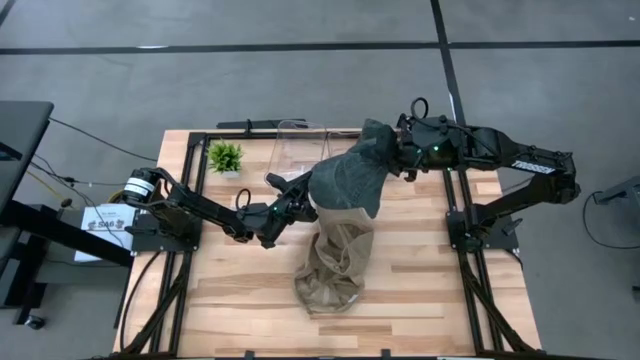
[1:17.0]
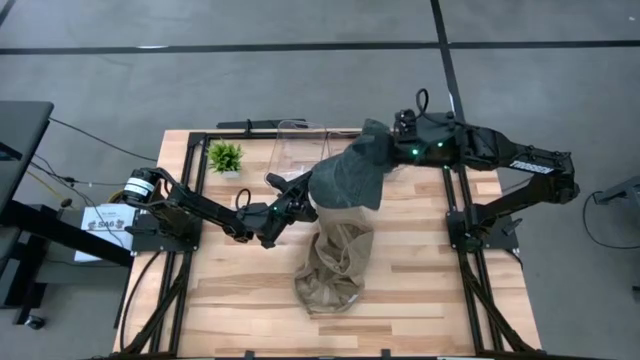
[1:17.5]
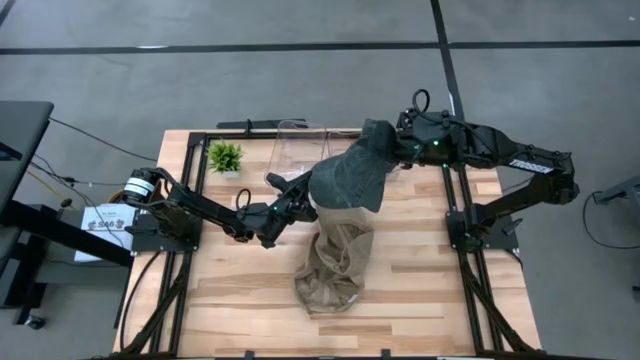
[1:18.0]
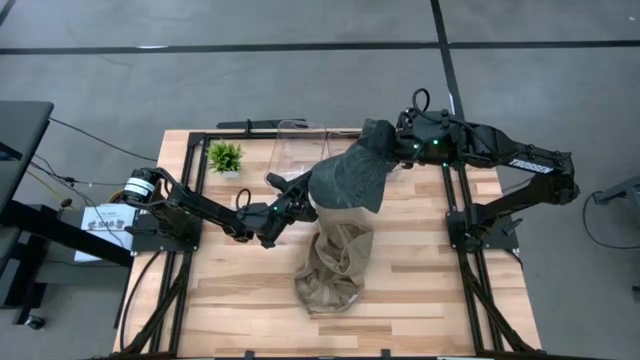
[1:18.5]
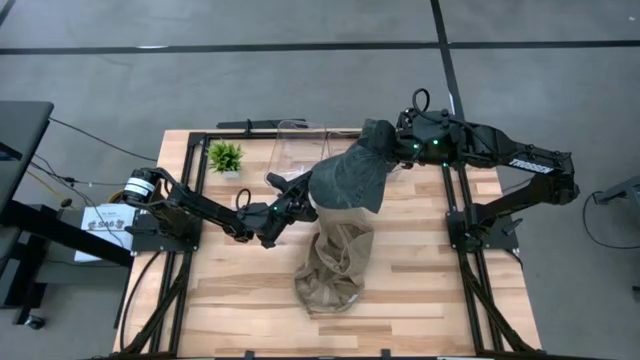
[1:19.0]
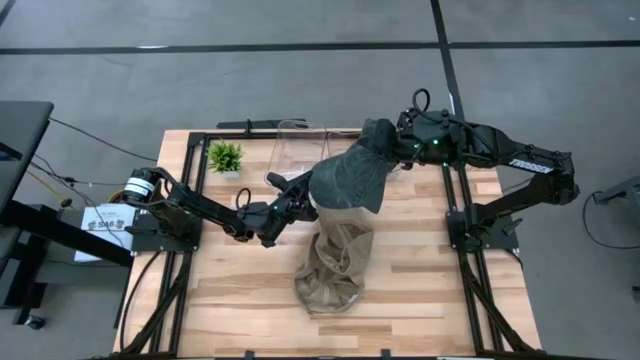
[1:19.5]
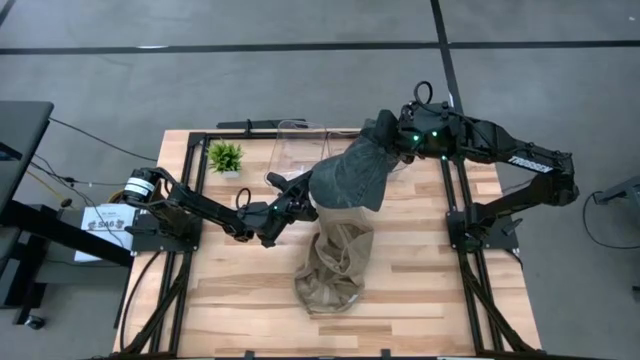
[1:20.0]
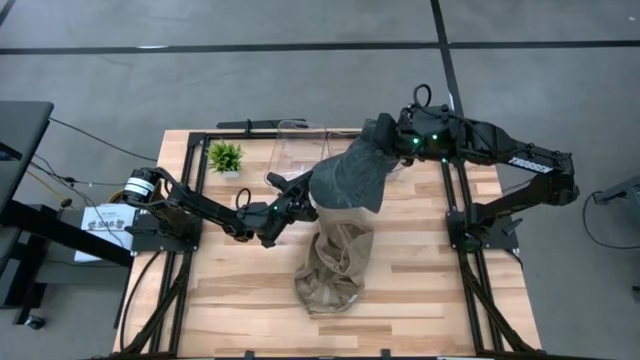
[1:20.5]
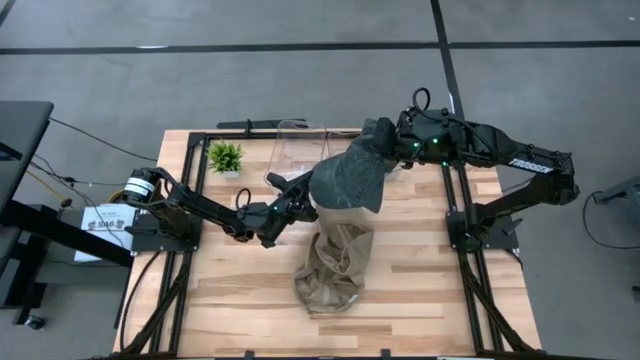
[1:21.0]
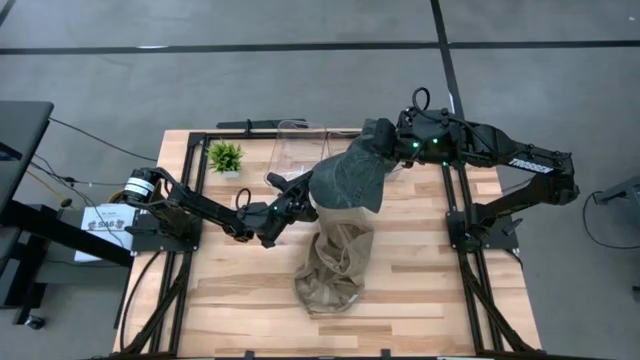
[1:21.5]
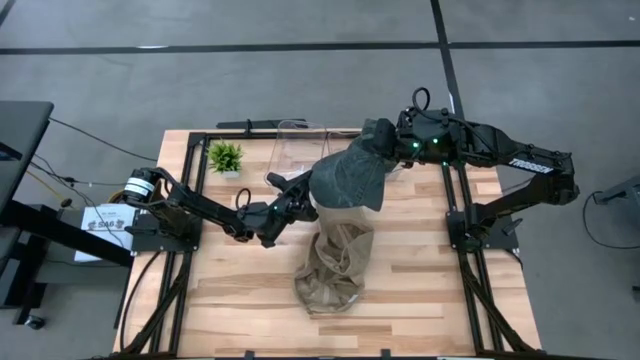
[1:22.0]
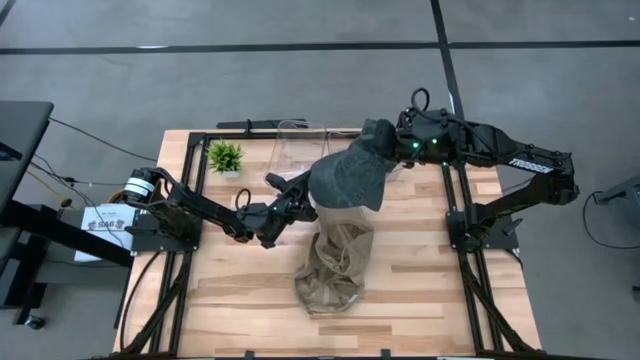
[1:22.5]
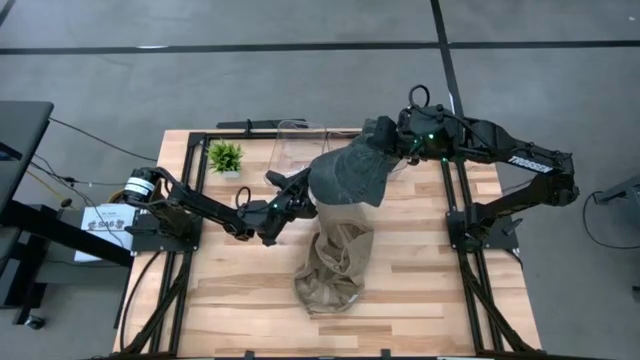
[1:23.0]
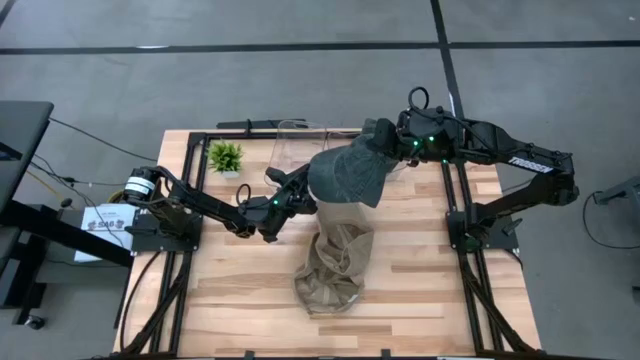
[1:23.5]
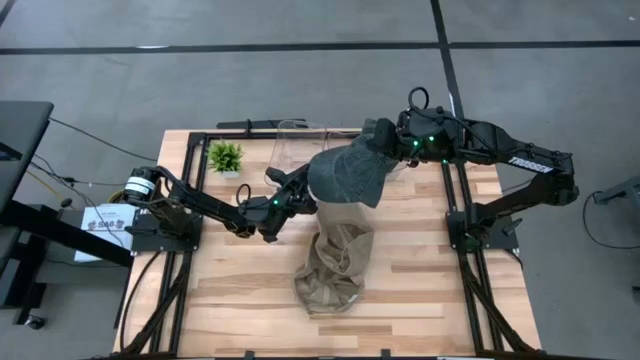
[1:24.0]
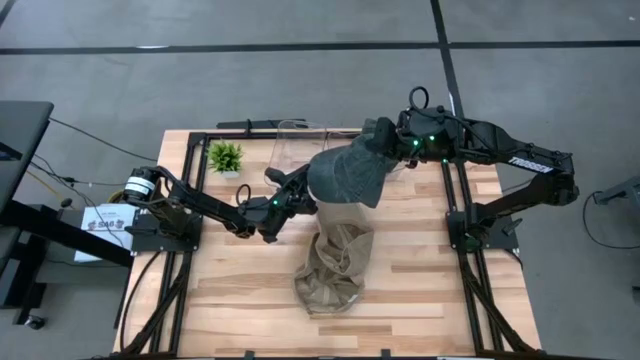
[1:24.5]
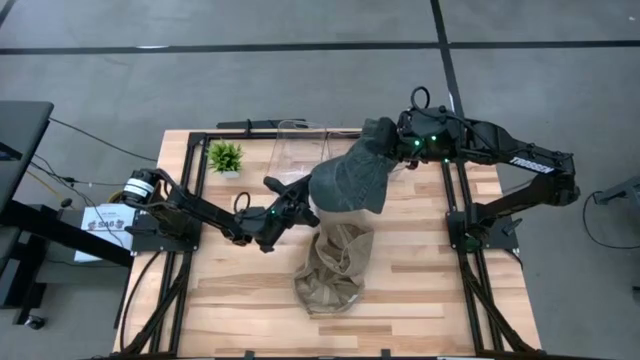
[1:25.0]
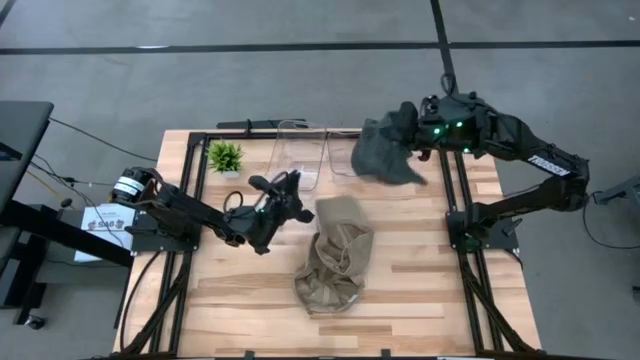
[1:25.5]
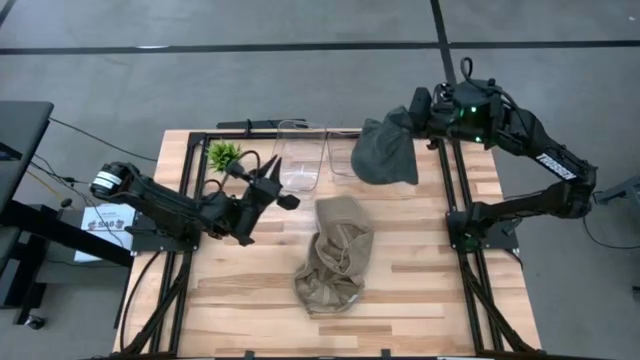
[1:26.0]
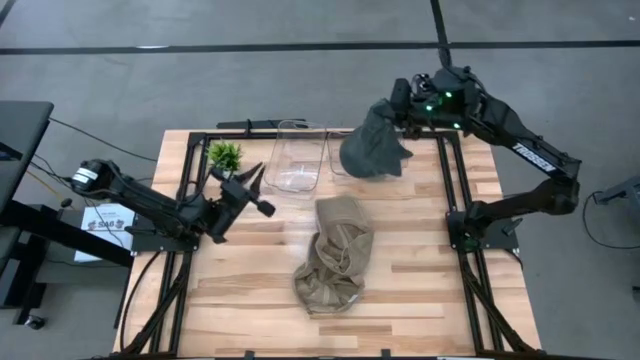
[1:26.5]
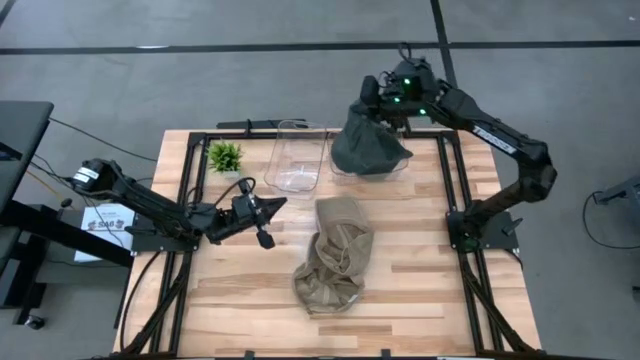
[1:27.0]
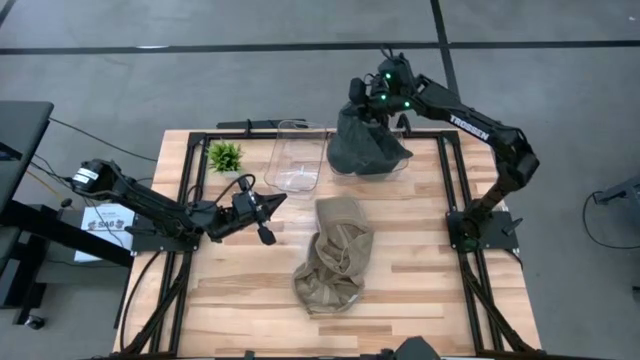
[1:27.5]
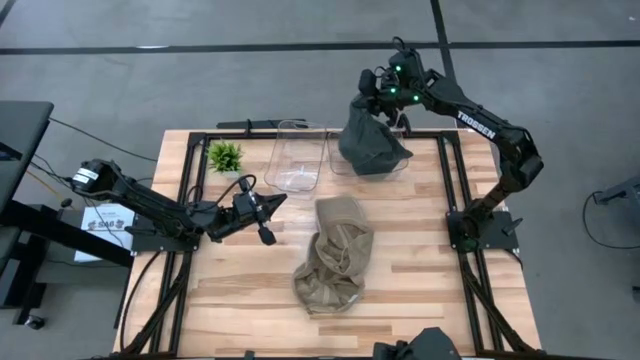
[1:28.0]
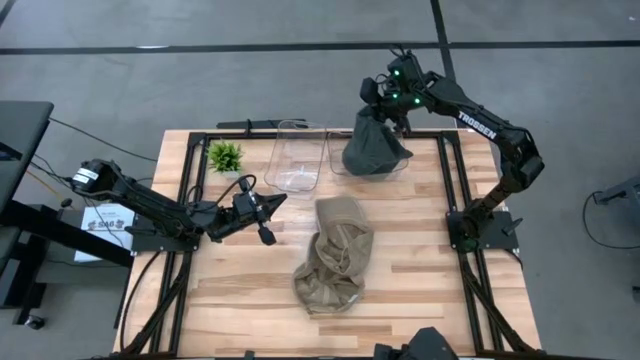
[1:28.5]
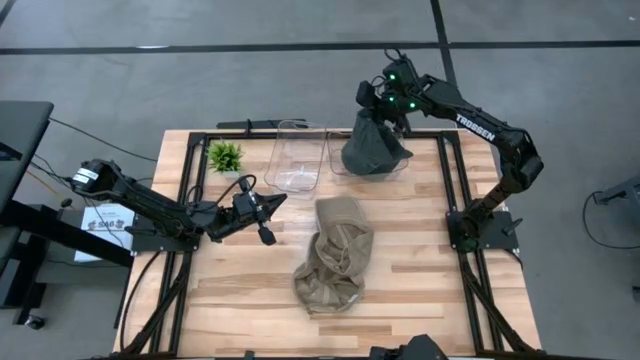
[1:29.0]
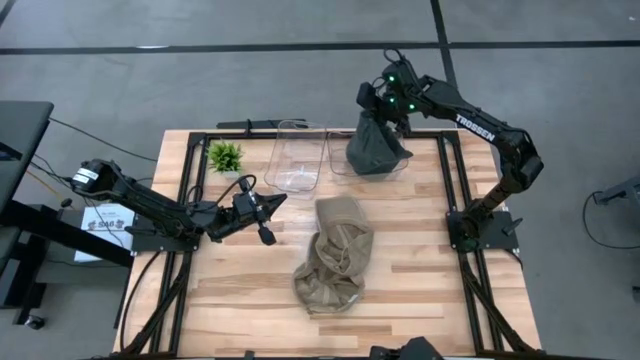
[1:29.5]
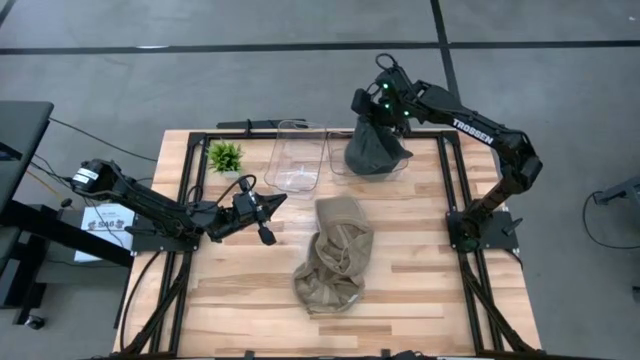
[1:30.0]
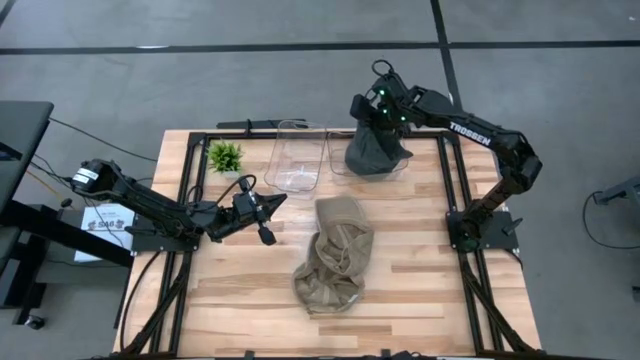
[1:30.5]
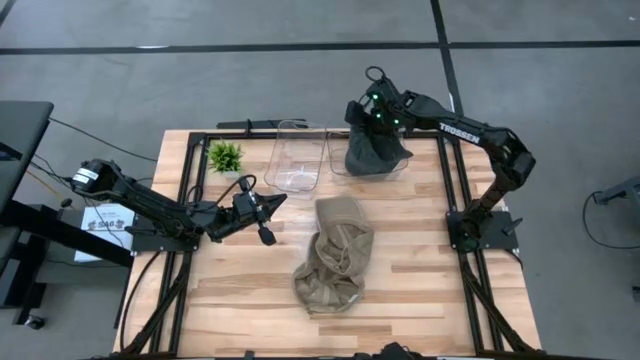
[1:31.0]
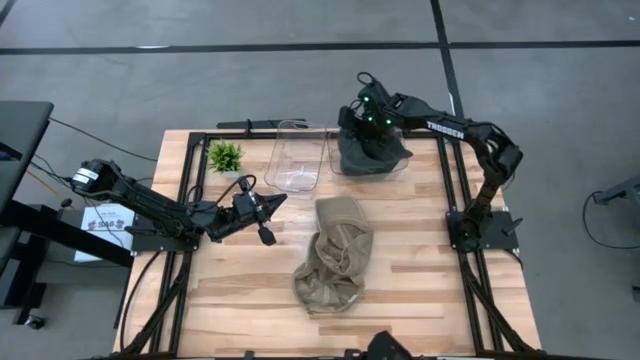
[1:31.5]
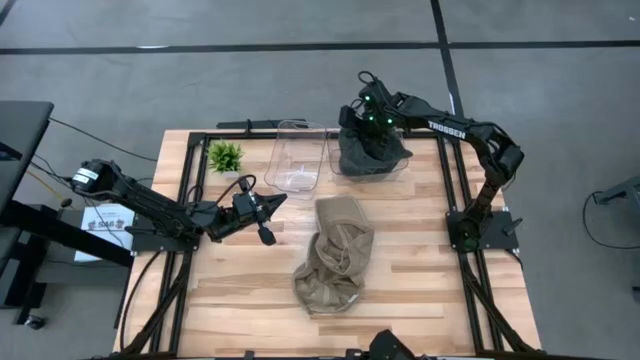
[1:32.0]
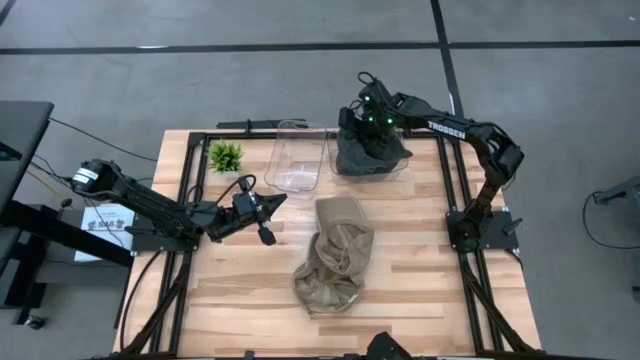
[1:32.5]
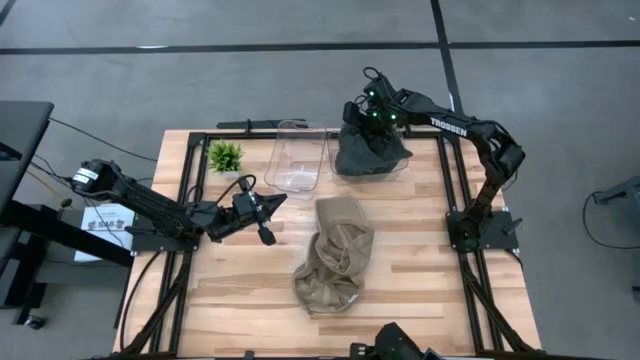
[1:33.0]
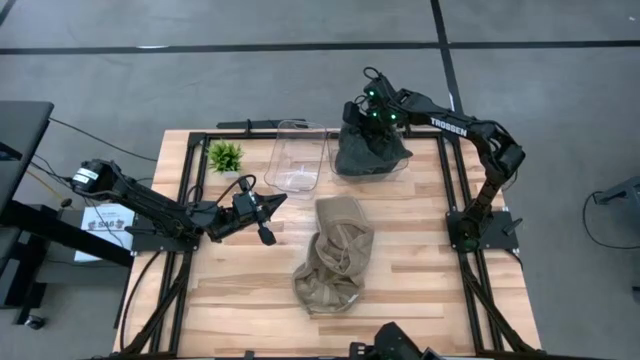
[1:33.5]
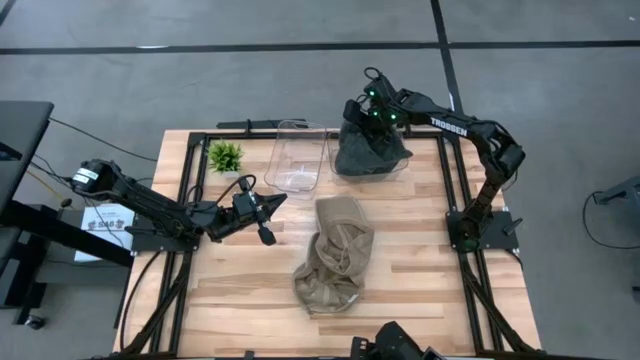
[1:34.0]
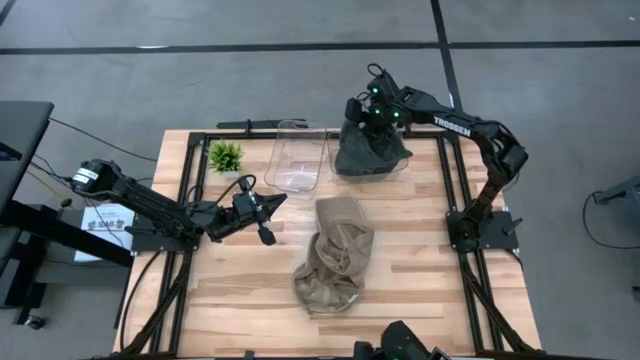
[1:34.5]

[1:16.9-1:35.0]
Task: Pick & Place hat
Put the black cap into the right transparent bin

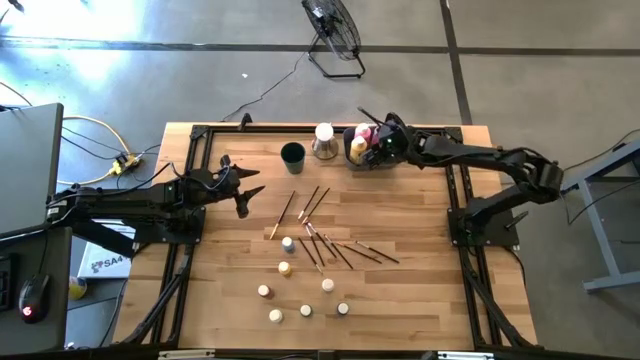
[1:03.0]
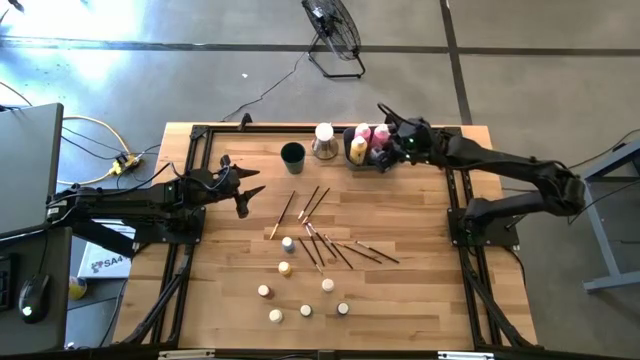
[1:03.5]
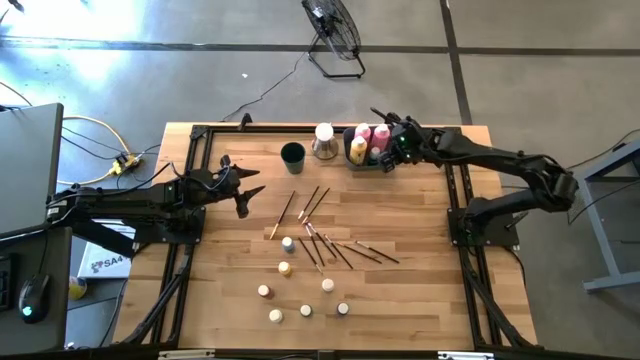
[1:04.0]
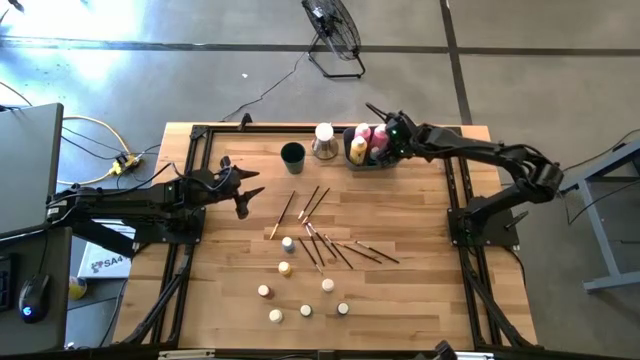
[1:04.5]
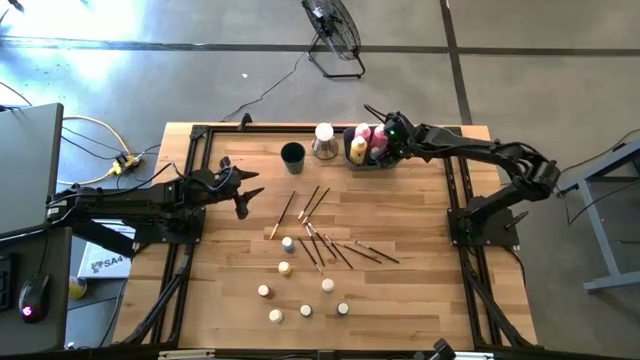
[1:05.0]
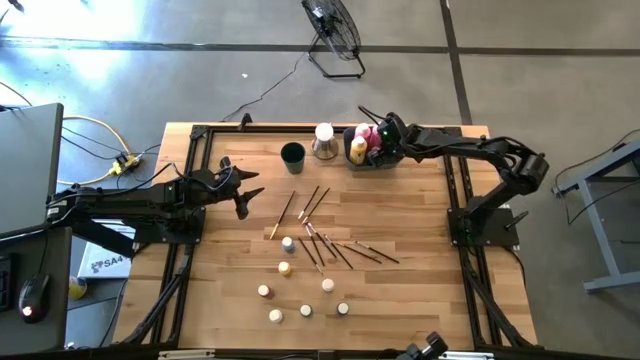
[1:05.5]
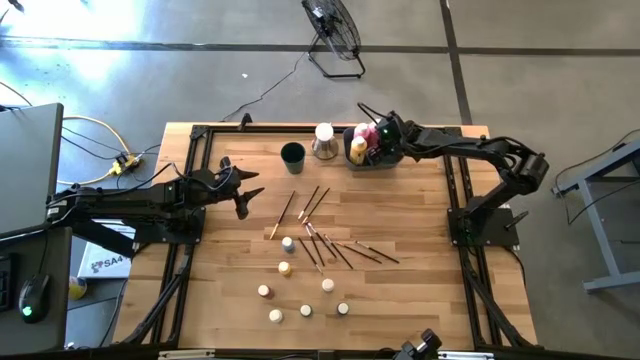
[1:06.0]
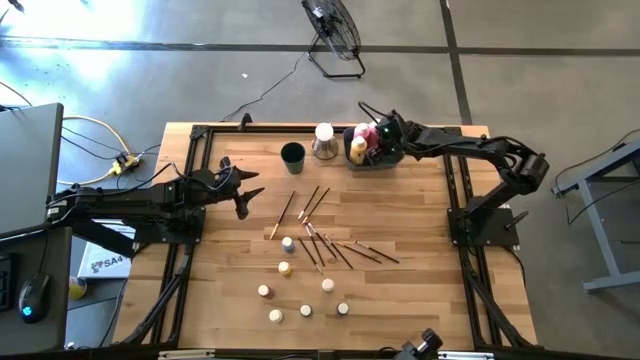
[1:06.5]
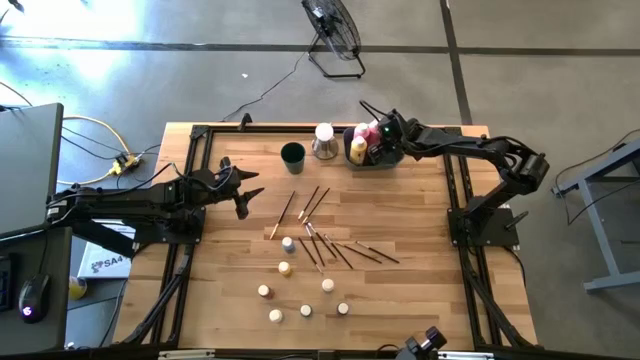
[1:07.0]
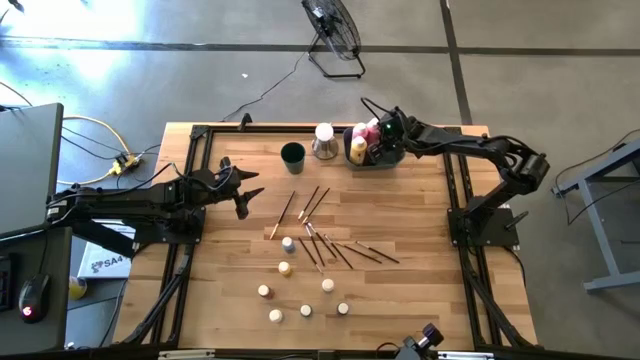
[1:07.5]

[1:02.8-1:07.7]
Task: Pick & Place Paint Supplies
Adjust the large pink paint bottle into the blue bin
